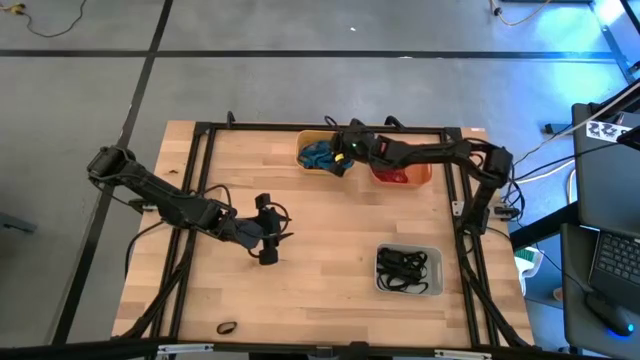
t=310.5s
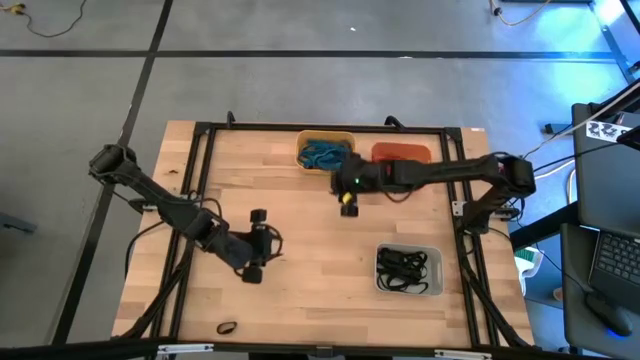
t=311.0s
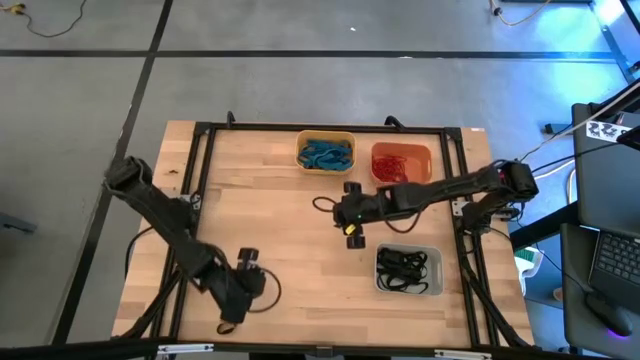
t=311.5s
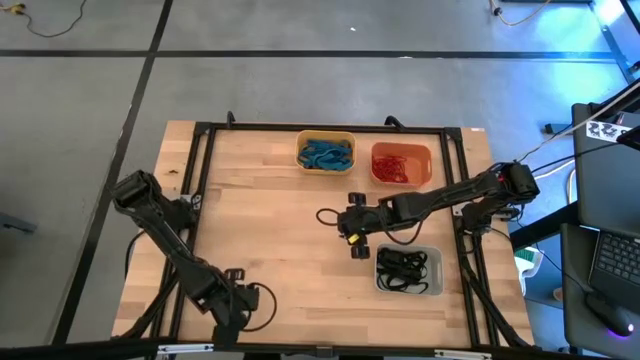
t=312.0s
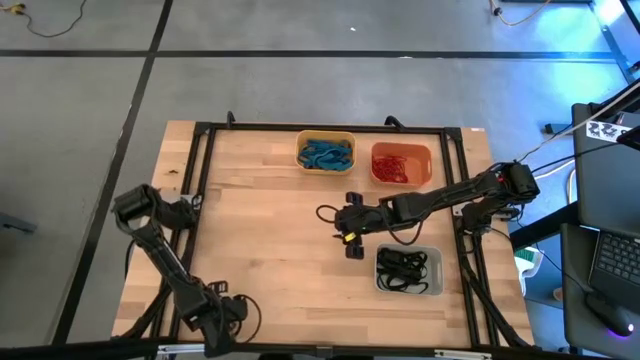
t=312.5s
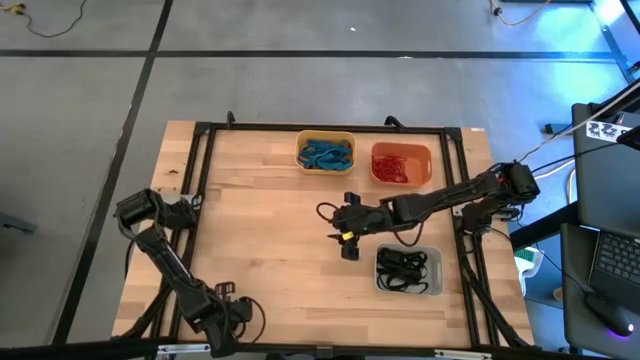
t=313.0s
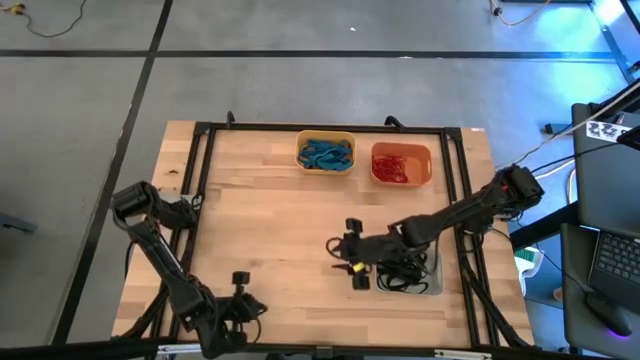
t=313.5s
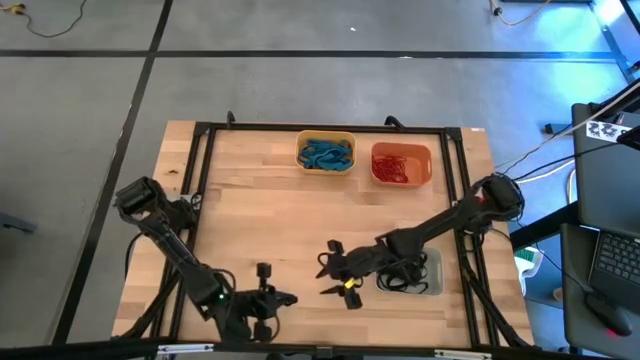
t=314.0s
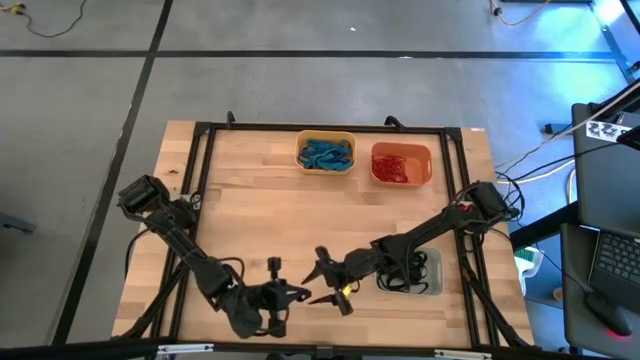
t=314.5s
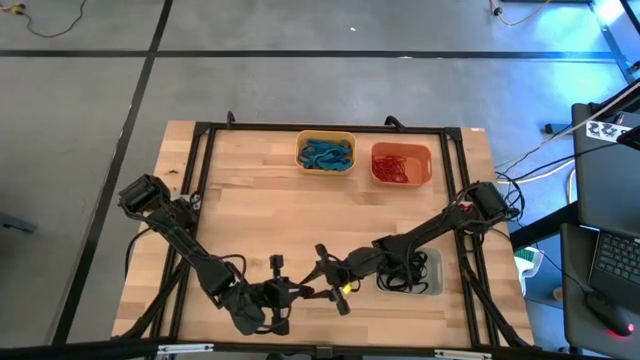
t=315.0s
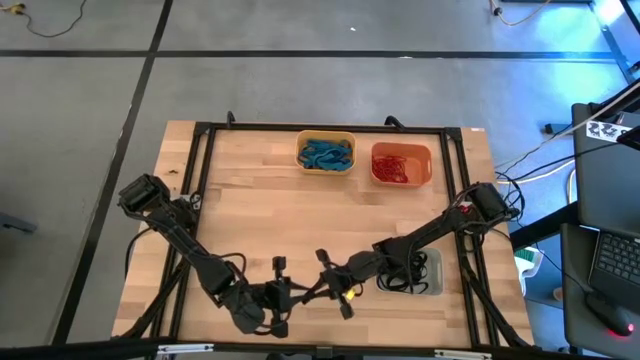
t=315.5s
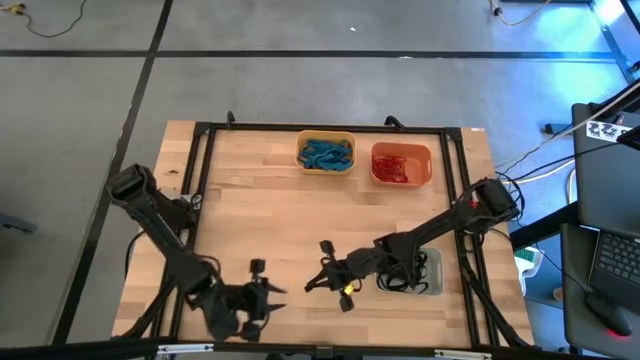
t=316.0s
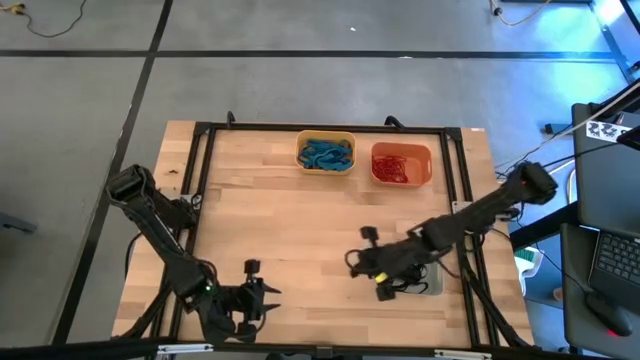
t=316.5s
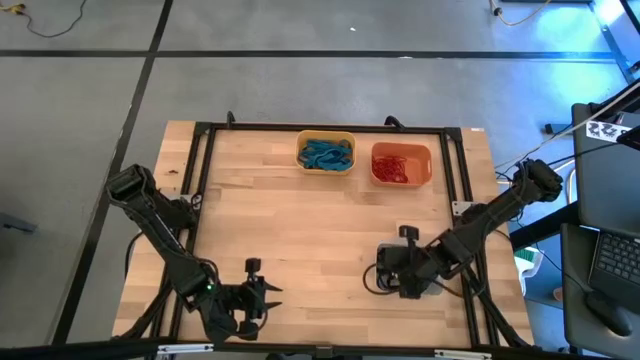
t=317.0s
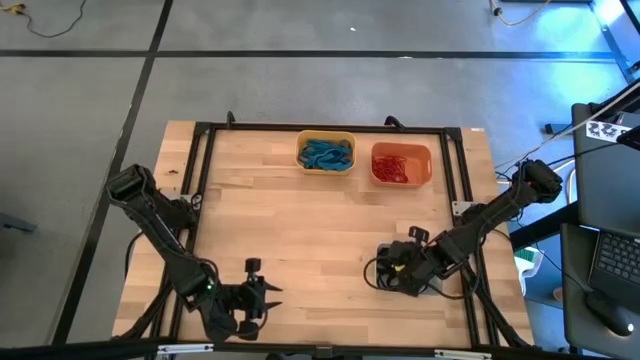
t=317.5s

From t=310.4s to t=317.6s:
Task: Sort rubber bands into baskets
Put the black rubber band into the white bin

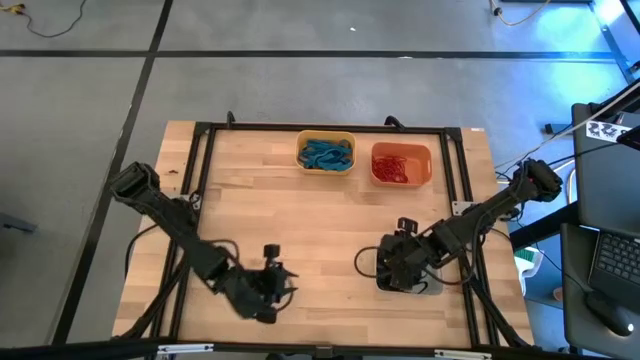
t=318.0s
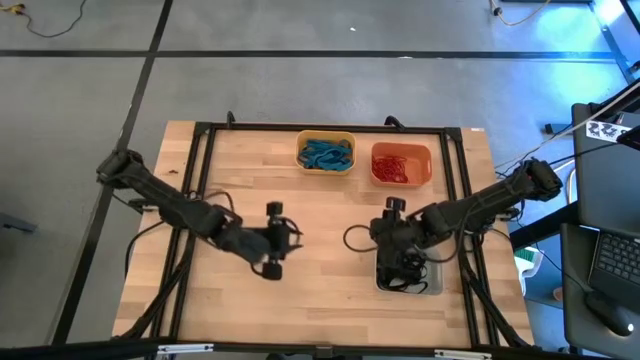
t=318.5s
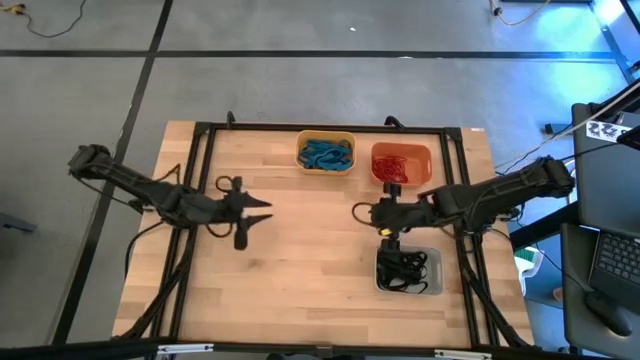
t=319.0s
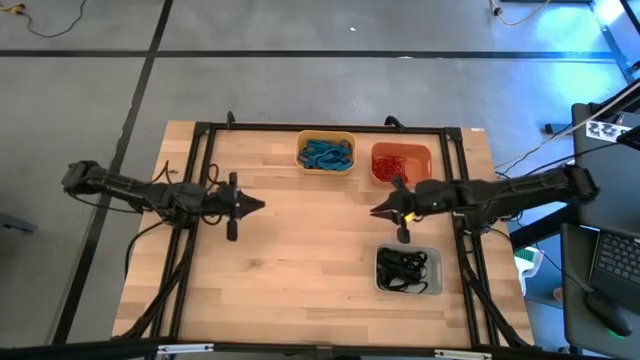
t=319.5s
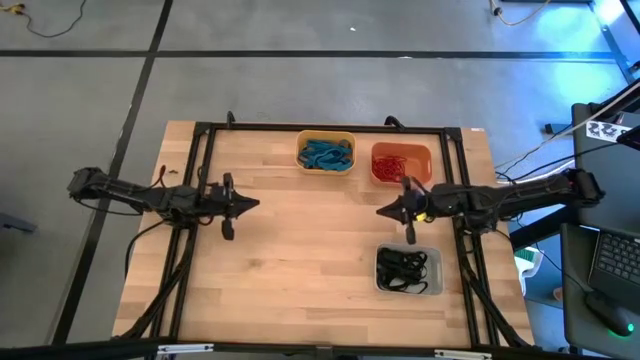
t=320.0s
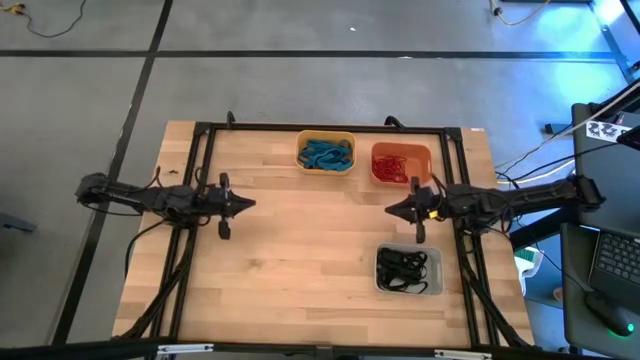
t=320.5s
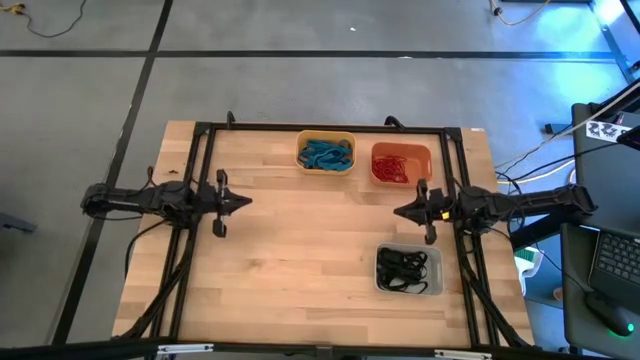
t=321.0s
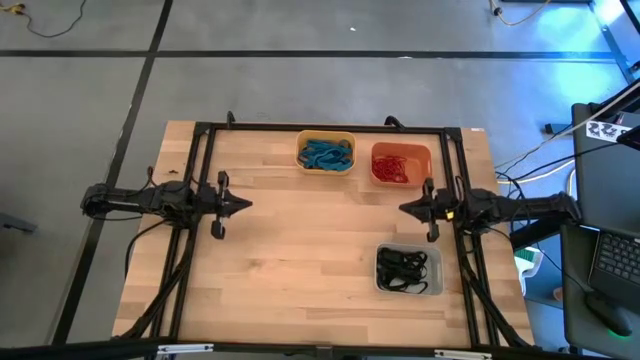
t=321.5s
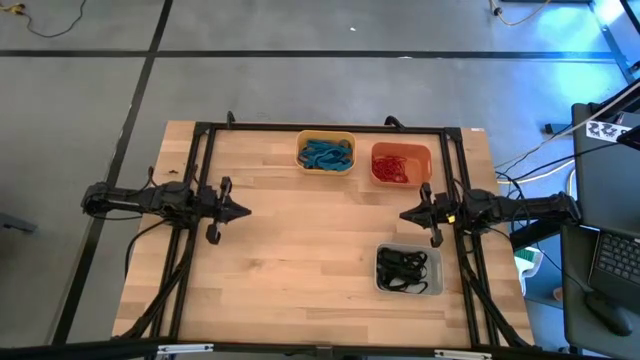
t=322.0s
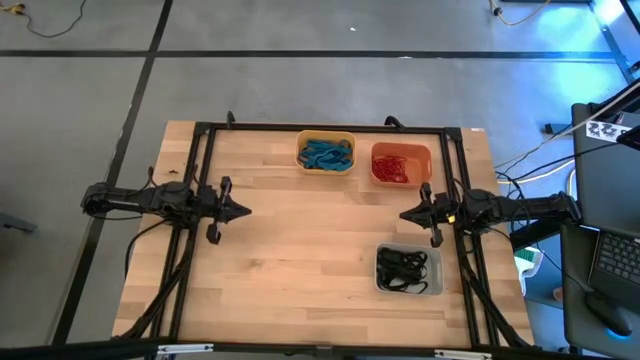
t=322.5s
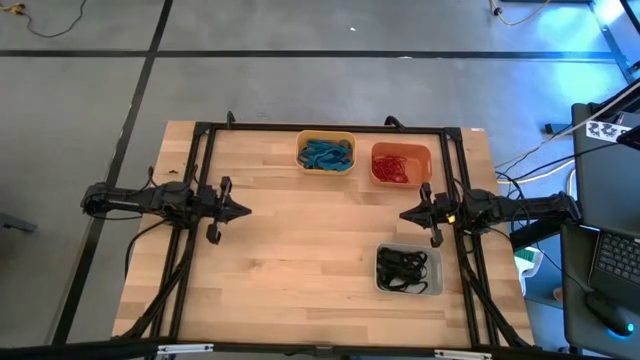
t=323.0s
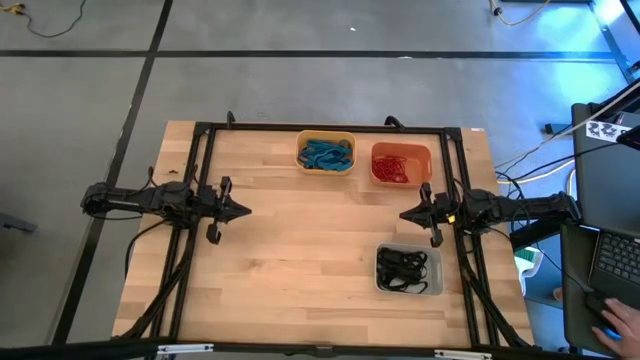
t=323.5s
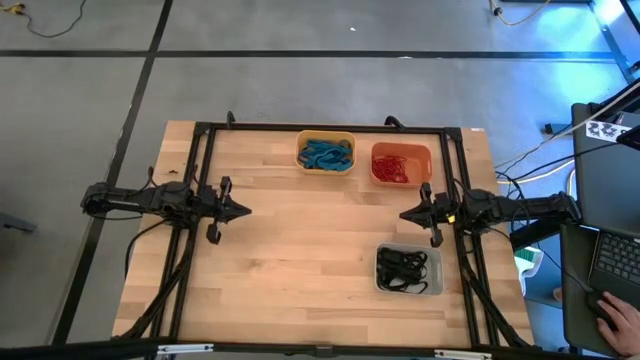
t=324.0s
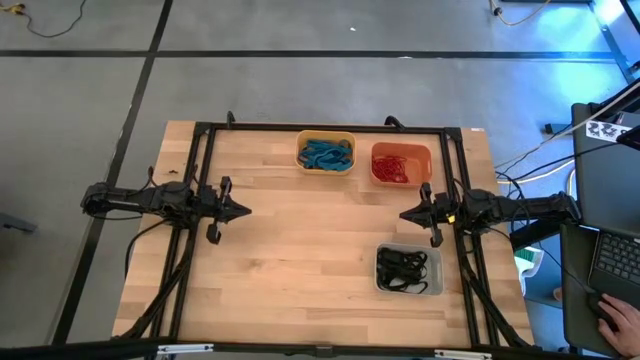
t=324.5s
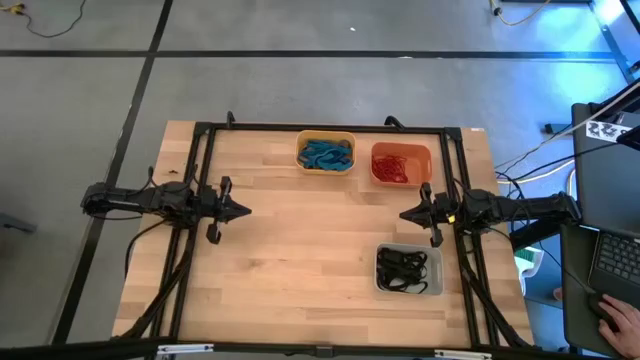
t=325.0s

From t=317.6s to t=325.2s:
Return to Home Position

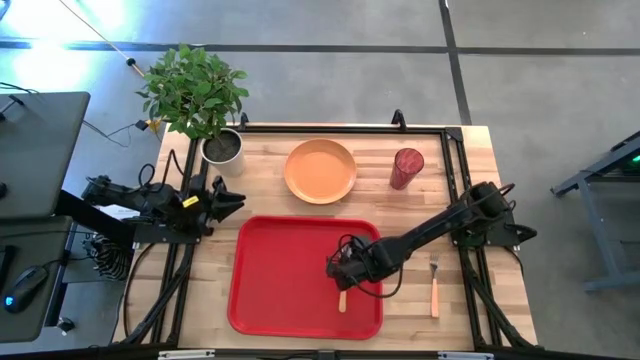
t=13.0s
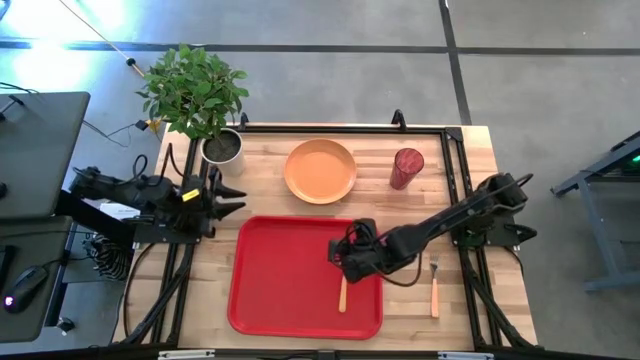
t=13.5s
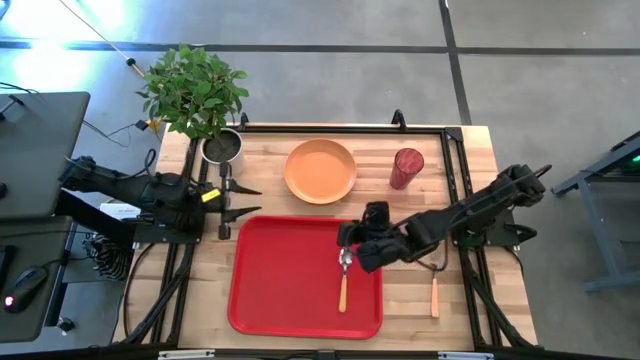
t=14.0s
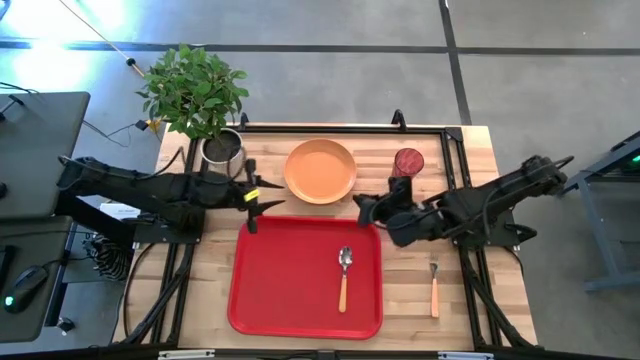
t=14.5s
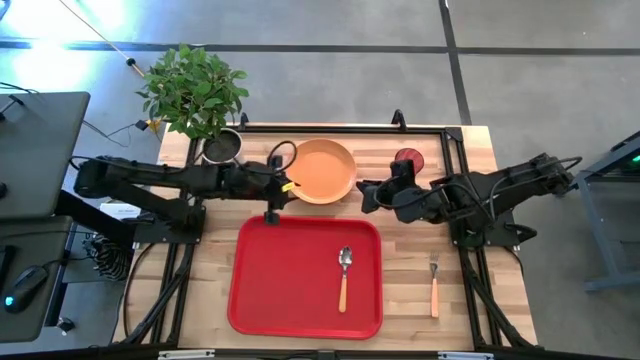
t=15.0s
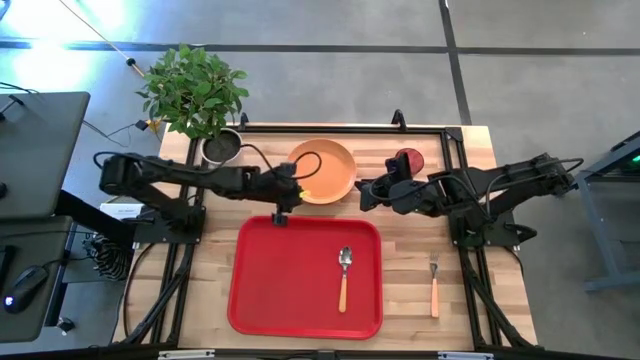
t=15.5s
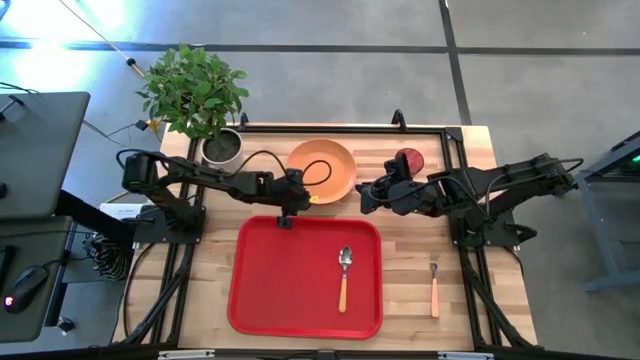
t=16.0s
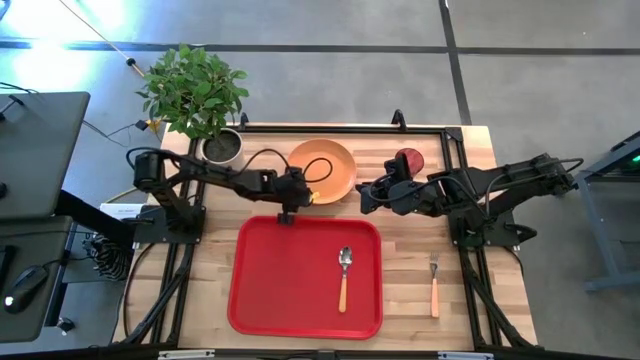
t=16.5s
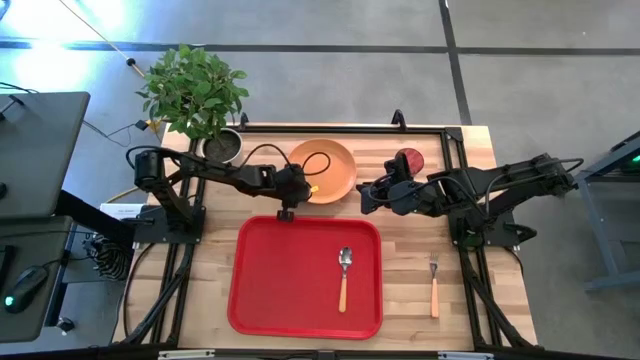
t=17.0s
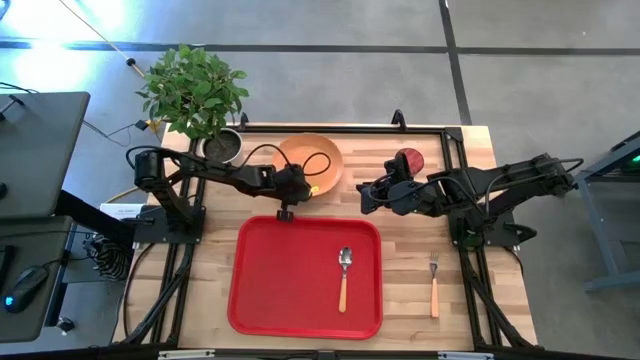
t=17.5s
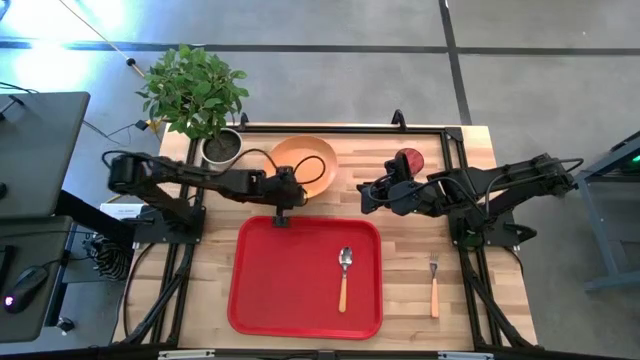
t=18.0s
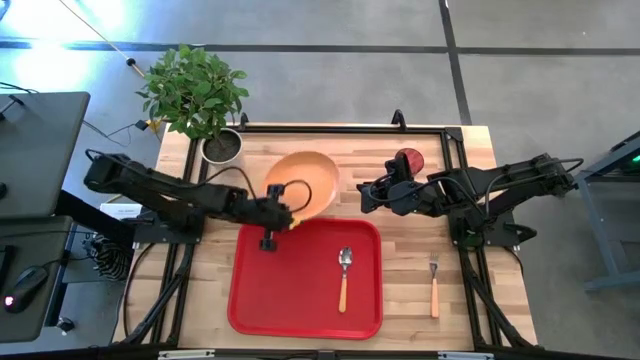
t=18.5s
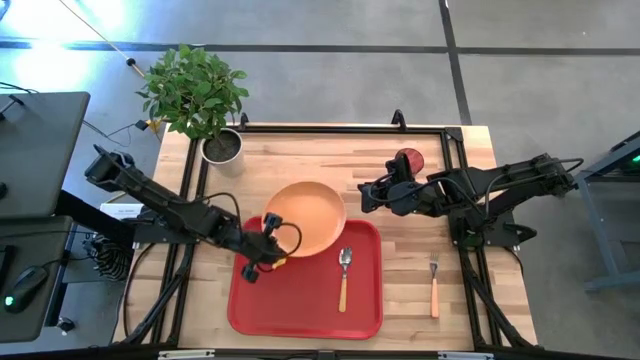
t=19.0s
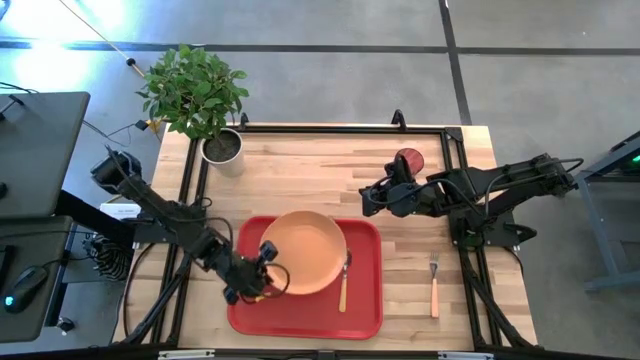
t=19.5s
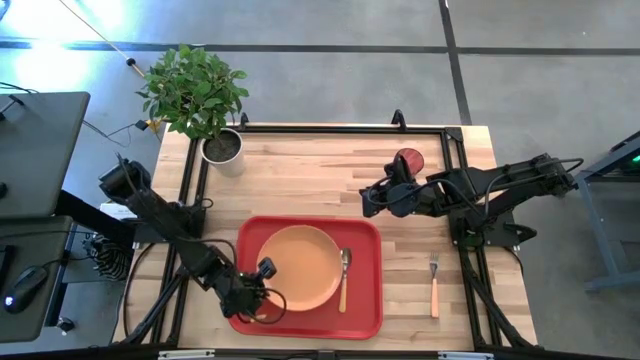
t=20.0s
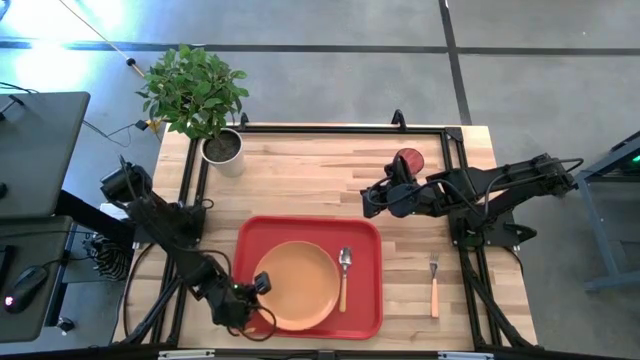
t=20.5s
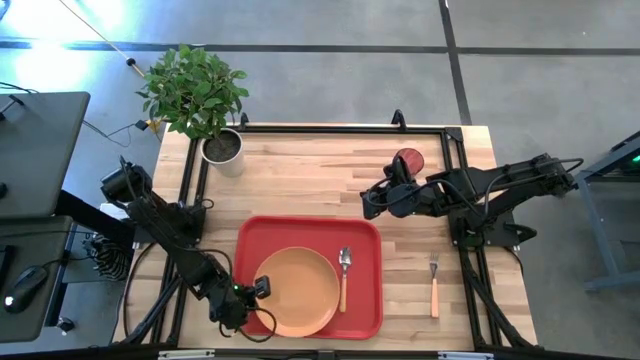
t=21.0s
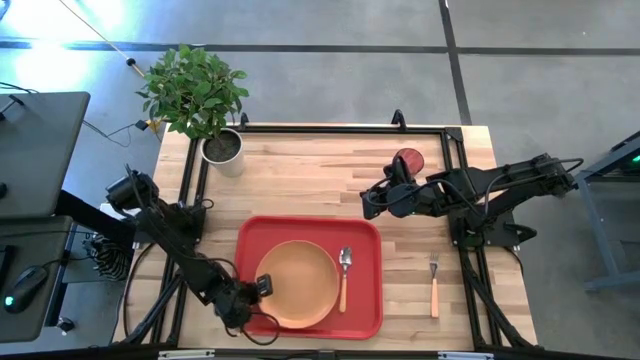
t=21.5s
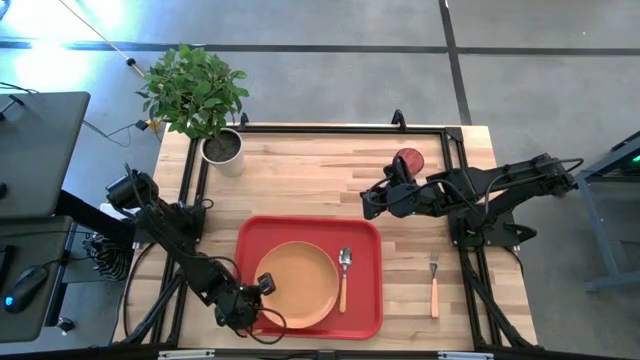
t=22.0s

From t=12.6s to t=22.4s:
Task: Pick and place plate/cup/fork/spoon on tray
Put the light orange plate at the center of the orange tray
